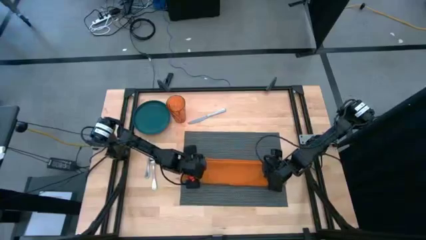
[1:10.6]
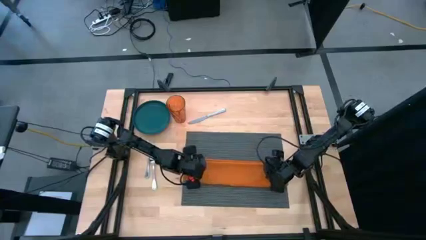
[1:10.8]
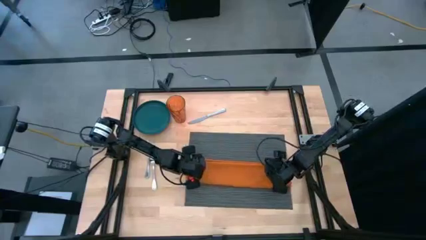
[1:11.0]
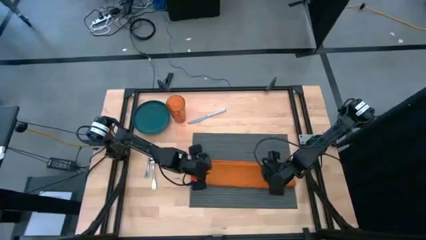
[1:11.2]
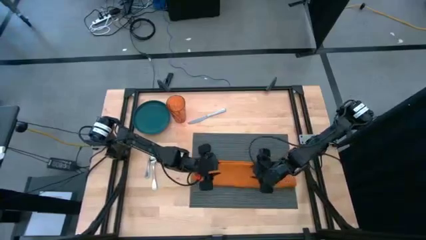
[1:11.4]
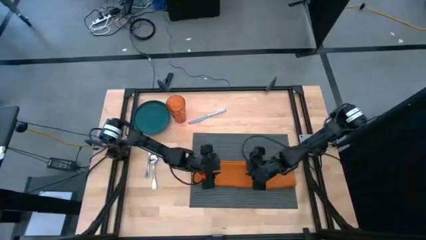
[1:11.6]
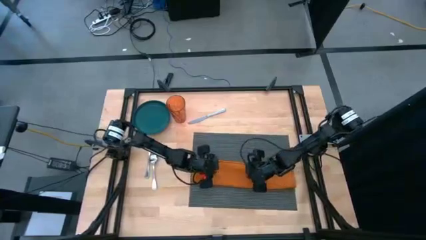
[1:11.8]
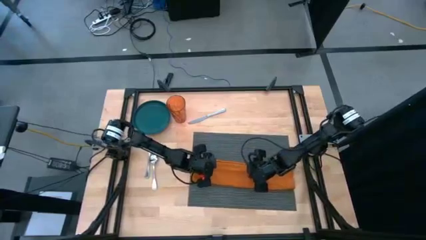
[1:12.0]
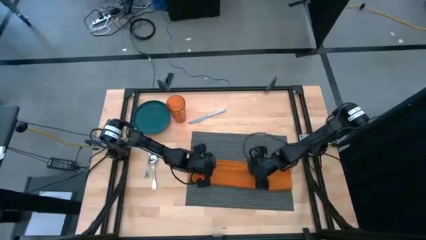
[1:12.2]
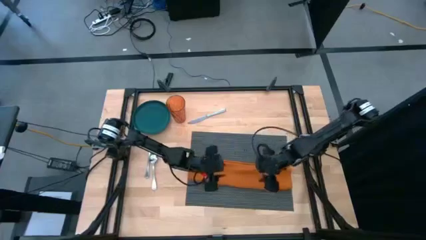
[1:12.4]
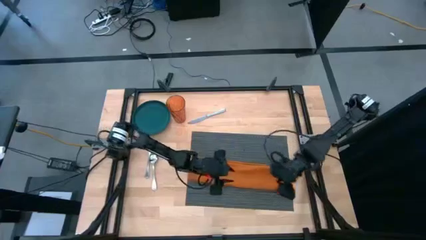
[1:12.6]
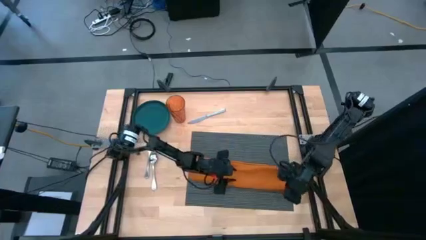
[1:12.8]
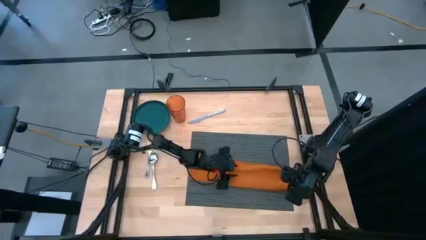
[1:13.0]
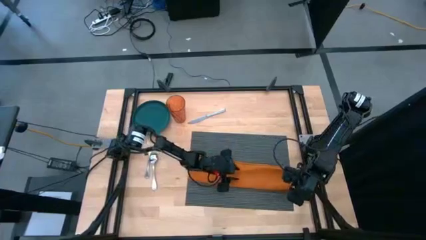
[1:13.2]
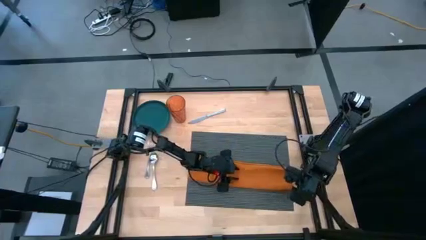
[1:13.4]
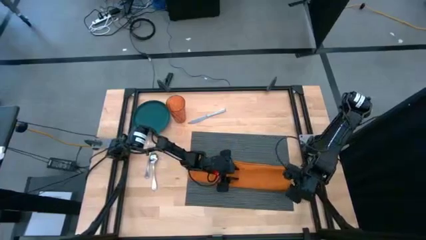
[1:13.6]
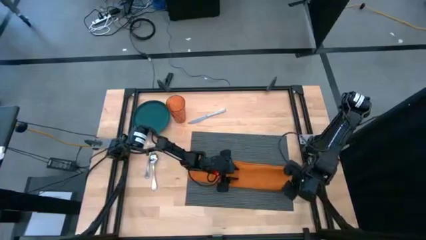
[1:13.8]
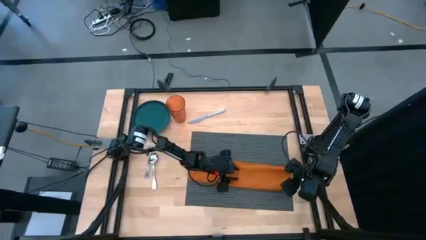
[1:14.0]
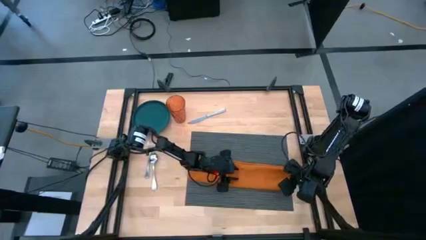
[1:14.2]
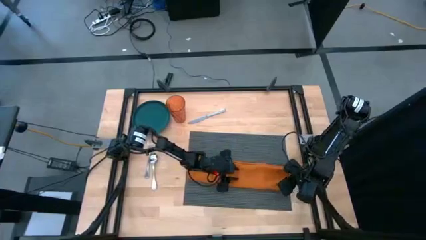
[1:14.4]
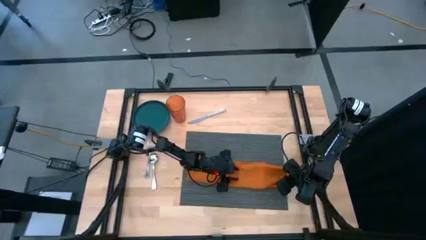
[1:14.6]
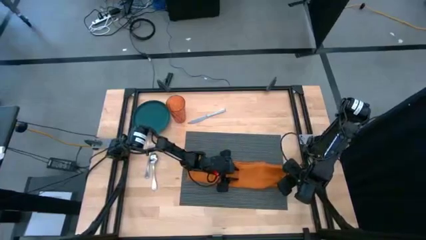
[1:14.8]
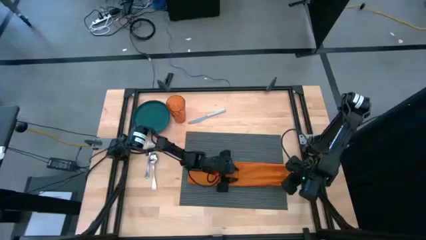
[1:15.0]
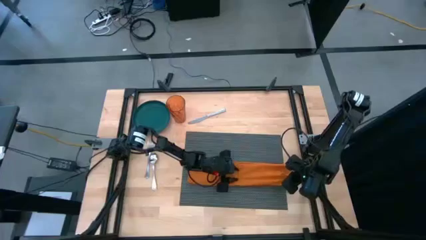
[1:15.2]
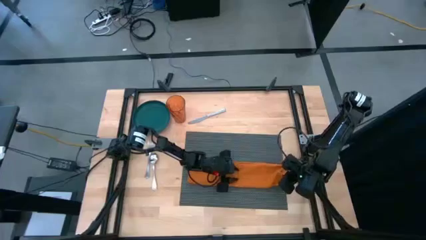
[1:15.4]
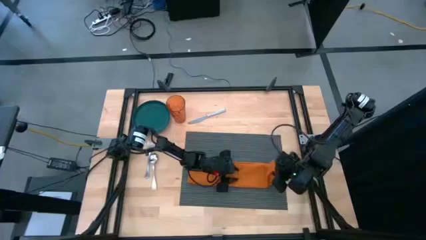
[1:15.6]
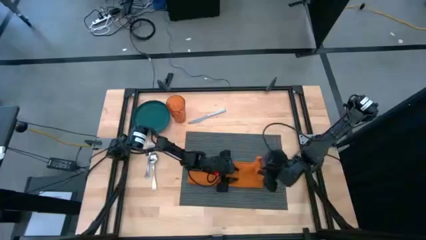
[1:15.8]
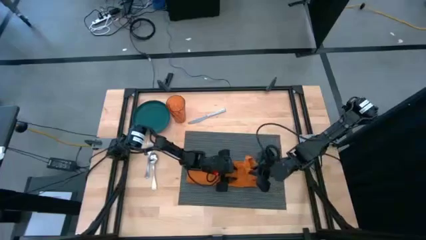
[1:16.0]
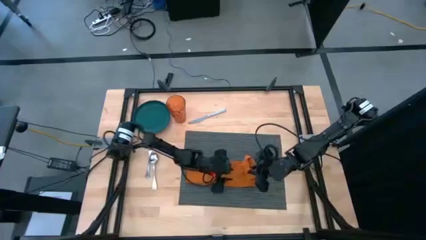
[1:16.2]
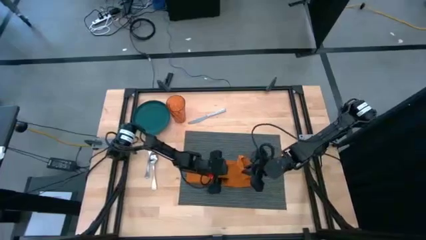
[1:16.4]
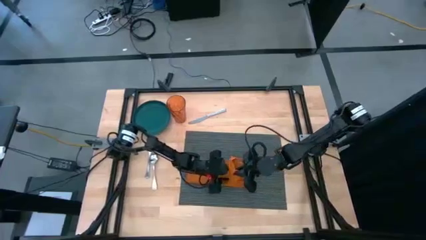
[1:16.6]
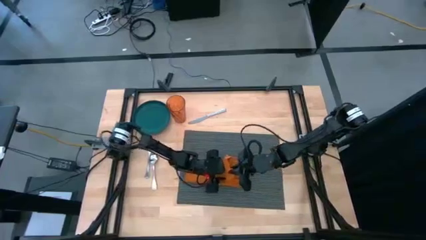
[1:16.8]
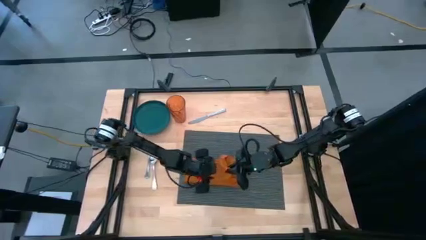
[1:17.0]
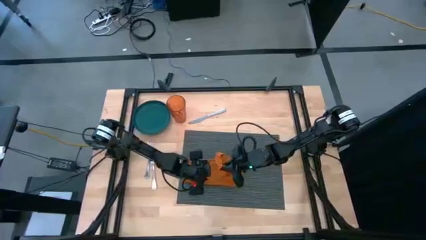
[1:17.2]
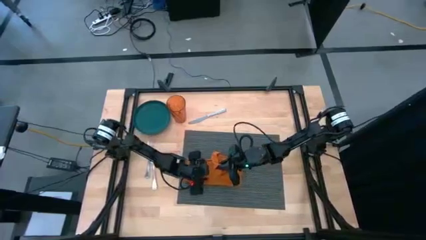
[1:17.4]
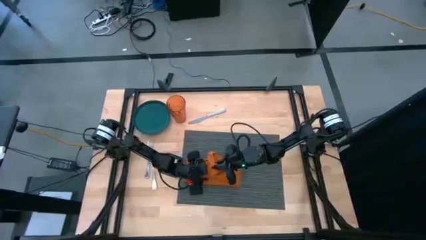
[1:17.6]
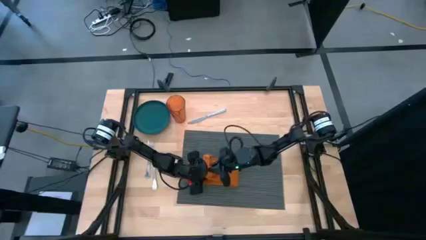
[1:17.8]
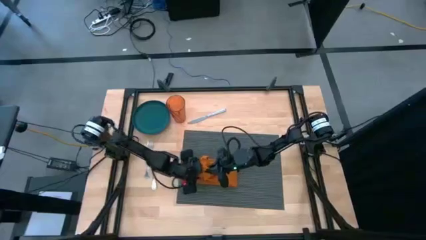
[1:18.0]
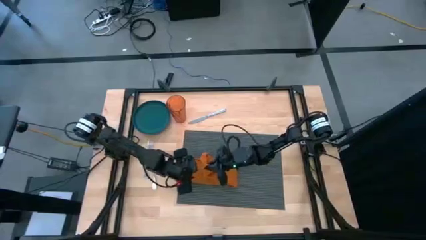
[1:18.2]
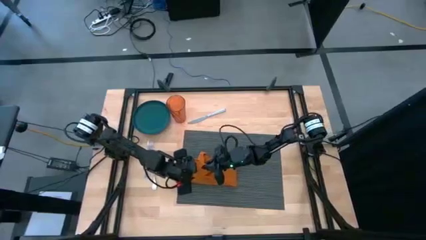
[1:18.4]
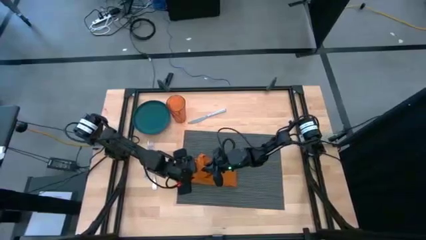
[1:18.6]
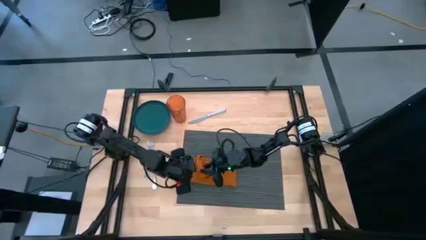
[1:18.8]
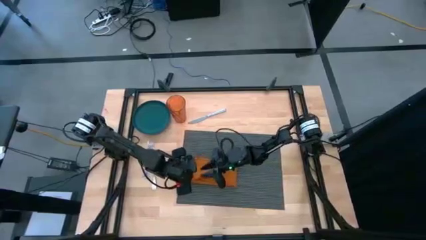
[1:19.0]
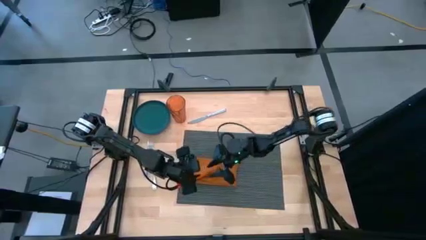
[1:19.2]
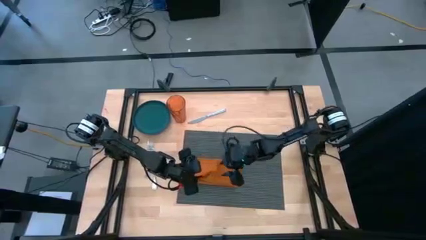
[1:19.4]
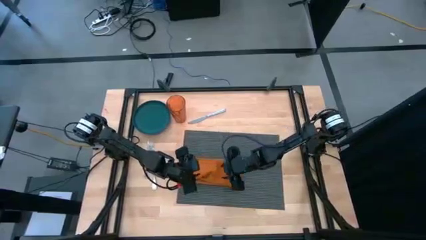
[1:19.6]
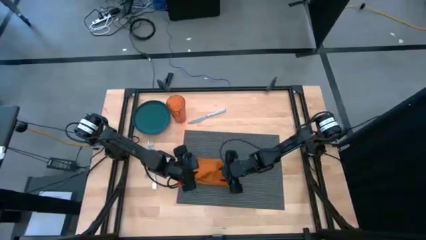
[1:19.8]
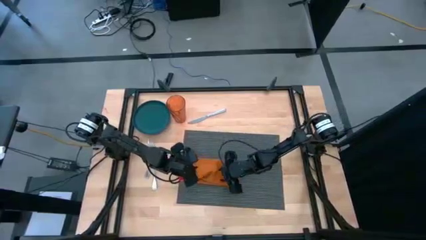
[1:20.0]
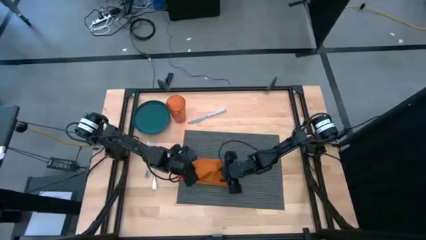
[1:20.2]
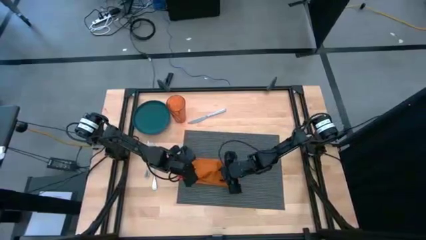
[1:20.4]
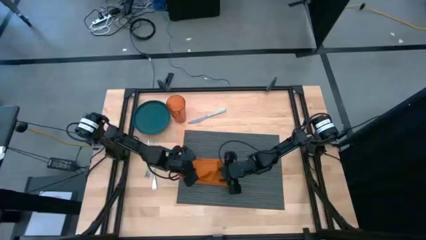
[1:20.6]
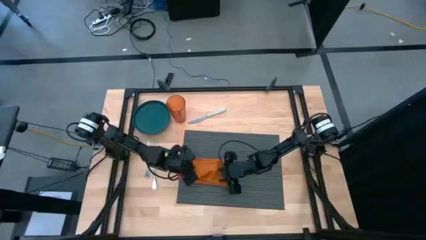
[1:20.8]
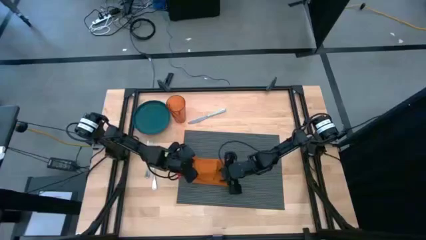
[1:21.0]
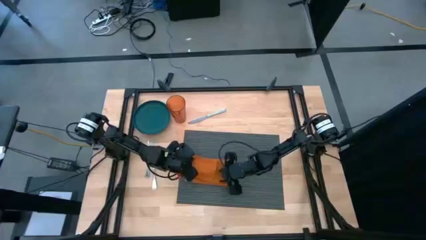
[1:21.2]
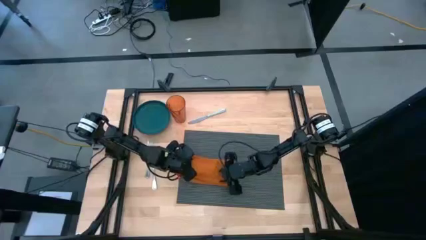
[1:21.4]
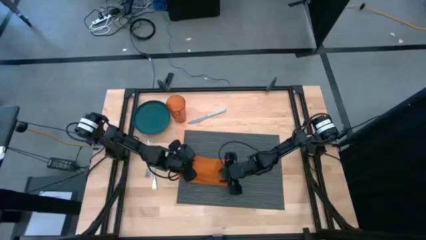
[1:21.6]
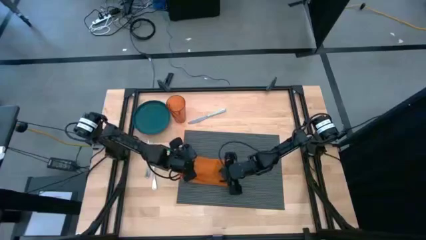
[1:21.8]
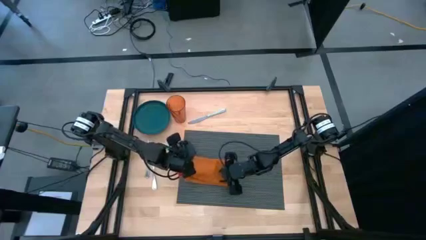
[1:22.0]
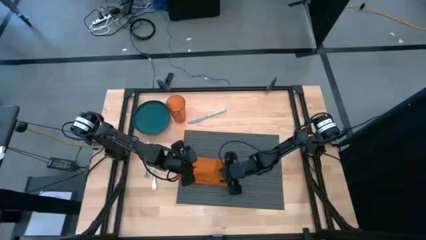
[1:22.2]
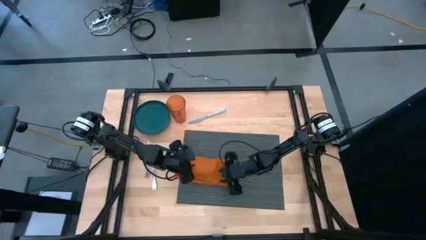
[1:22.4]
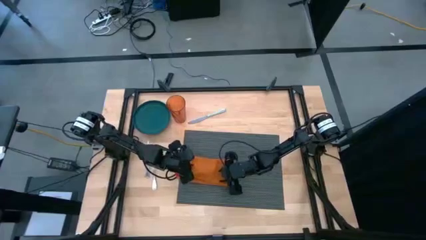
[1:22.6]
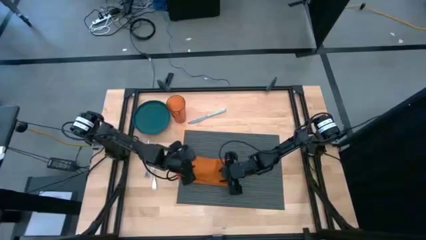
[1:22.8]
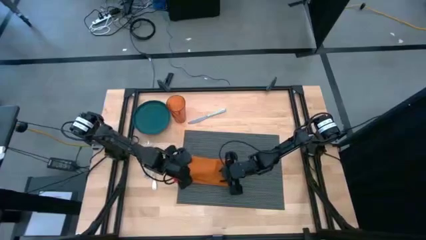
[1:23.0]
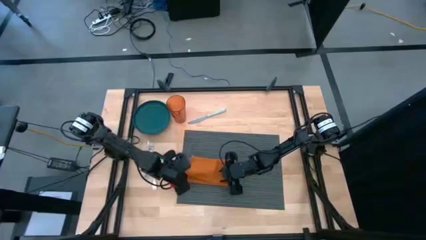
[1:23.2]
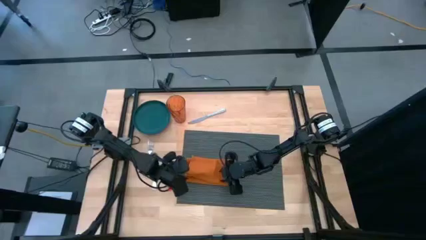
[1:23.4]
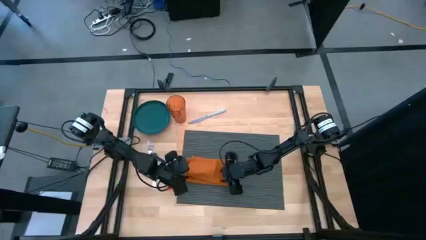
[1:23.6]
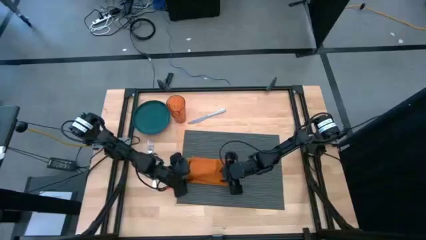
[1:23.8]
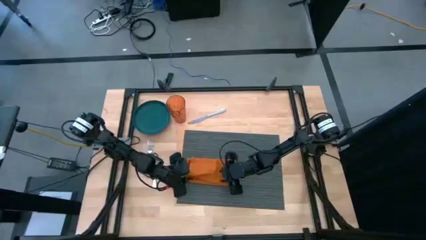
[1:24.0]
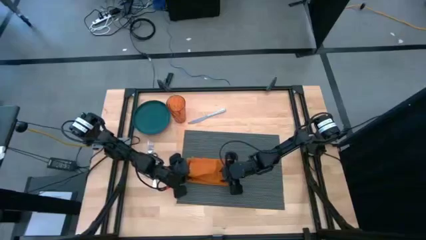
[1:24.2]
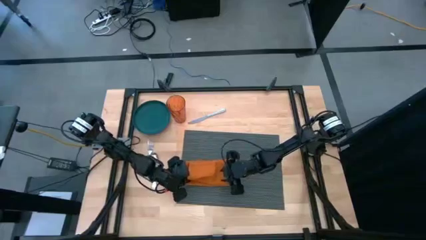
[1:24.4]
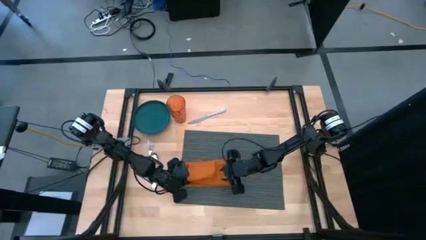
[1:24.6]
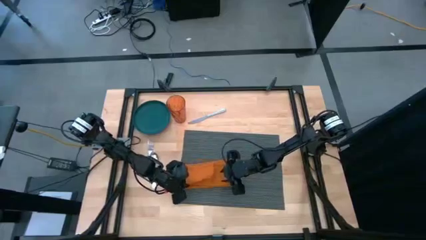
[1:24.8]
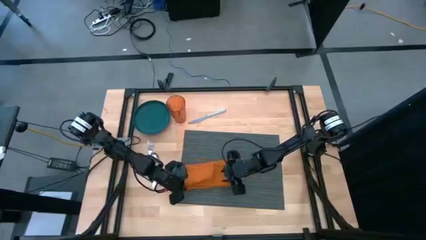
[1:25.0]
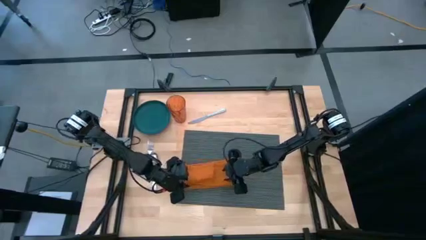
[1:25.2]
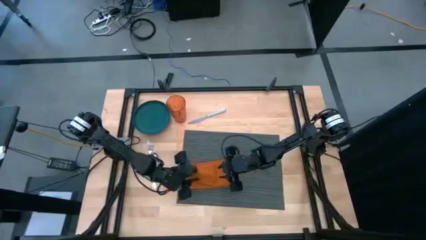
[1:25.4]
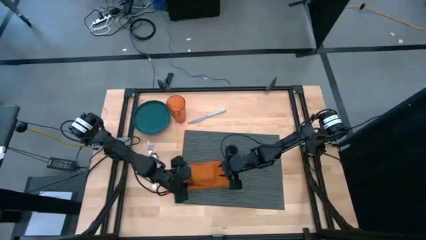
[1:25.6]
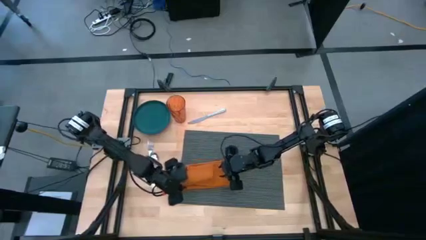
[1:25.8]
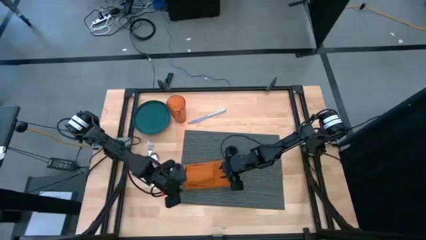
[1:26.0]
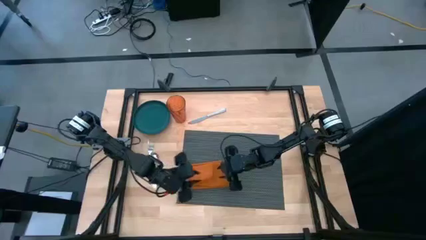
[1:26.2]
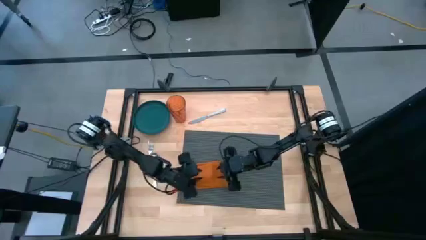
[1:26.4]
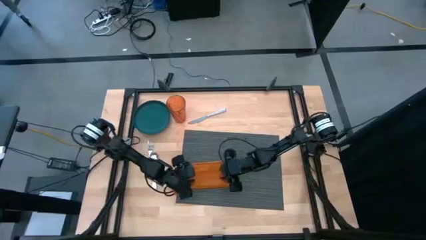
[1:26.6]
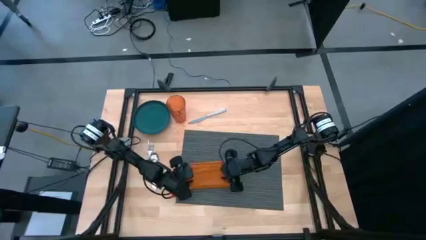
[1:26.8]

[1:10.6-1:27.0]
Task: Set table place
Fold the orange table napkin on the black placemat
